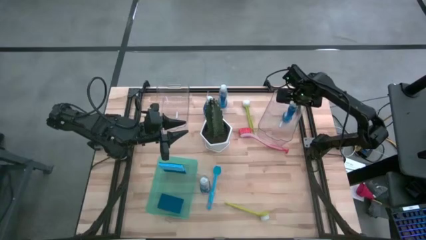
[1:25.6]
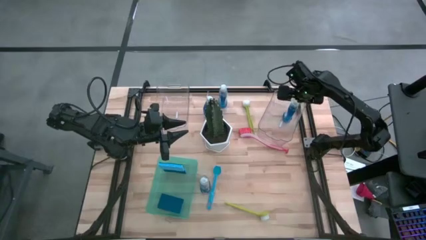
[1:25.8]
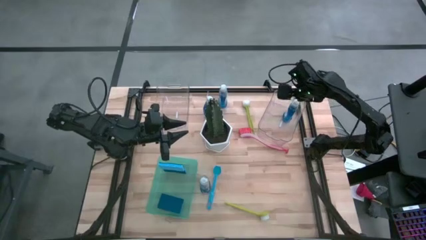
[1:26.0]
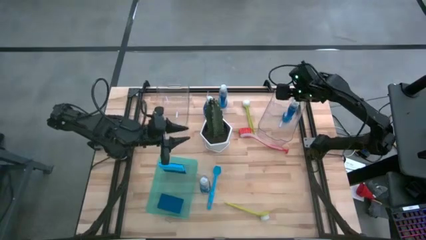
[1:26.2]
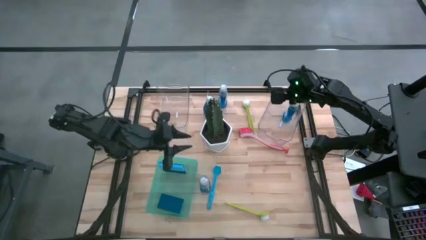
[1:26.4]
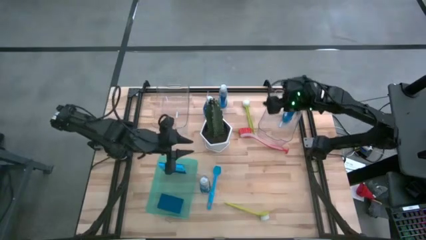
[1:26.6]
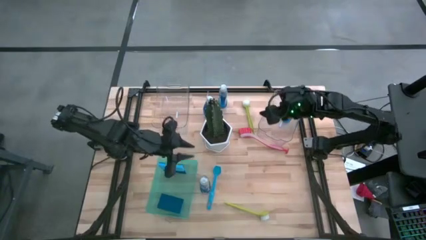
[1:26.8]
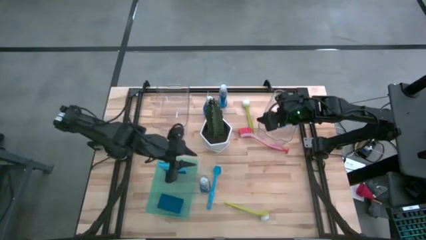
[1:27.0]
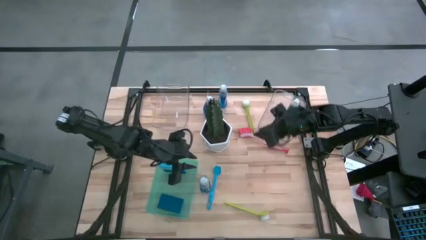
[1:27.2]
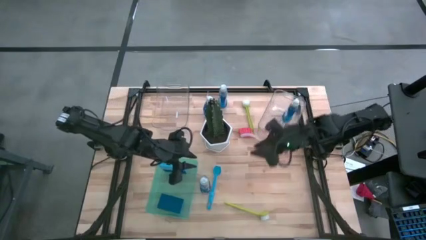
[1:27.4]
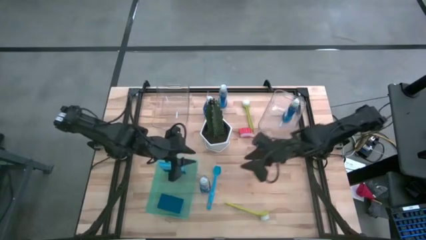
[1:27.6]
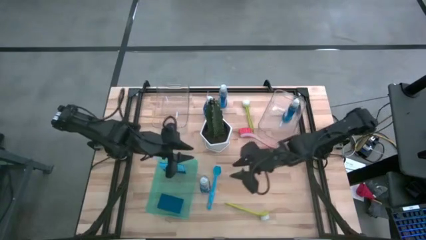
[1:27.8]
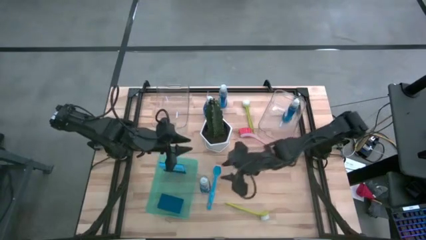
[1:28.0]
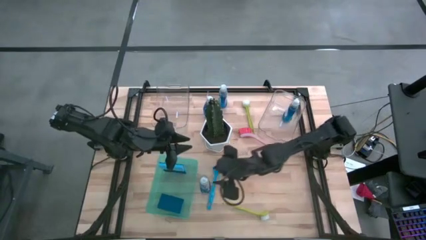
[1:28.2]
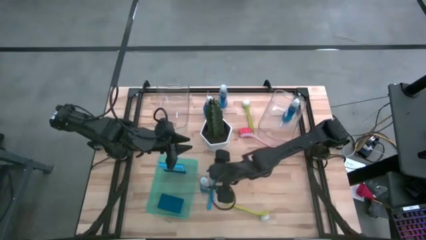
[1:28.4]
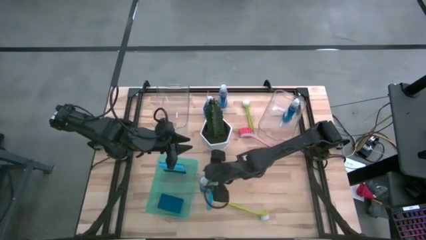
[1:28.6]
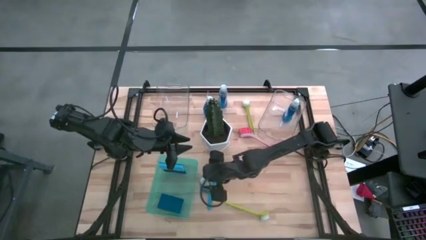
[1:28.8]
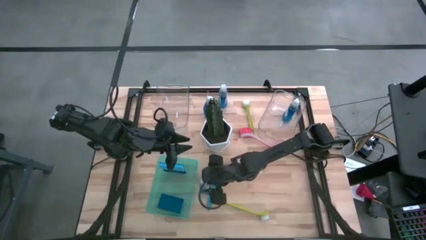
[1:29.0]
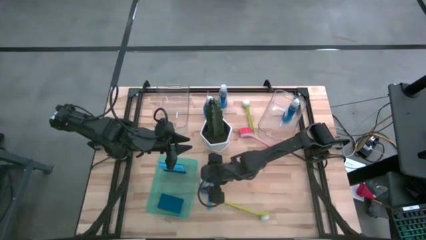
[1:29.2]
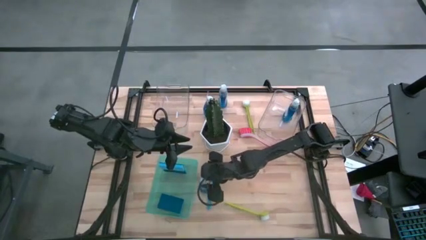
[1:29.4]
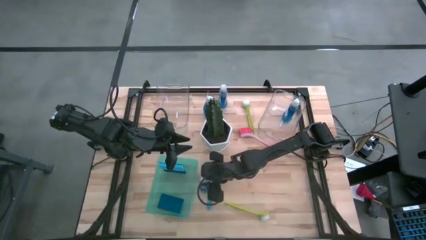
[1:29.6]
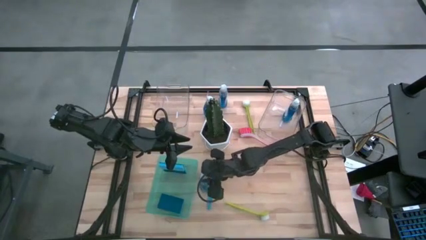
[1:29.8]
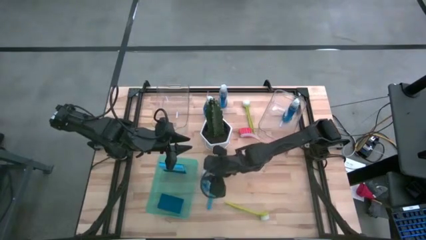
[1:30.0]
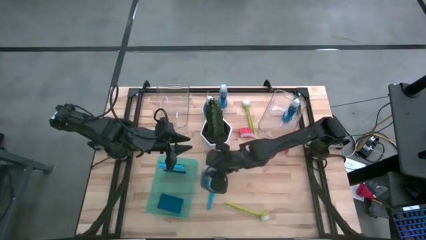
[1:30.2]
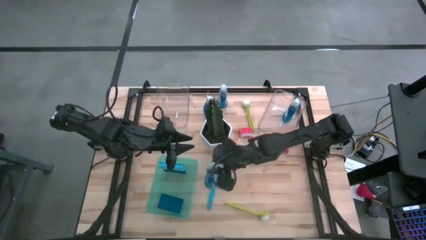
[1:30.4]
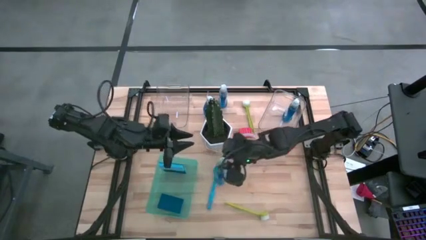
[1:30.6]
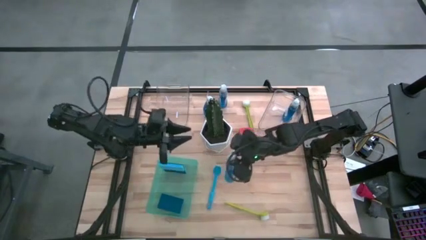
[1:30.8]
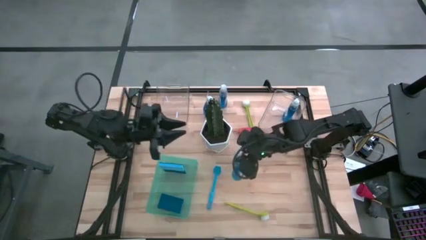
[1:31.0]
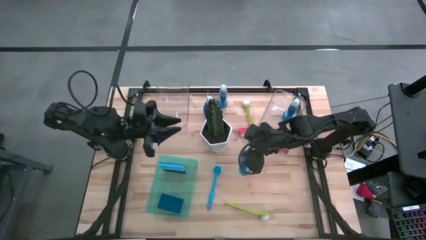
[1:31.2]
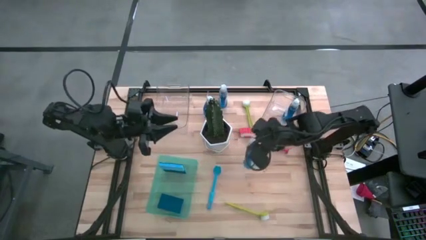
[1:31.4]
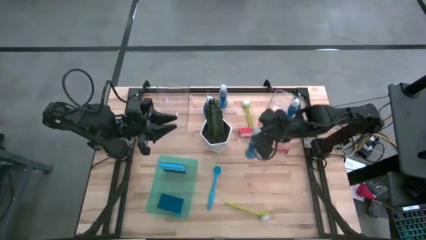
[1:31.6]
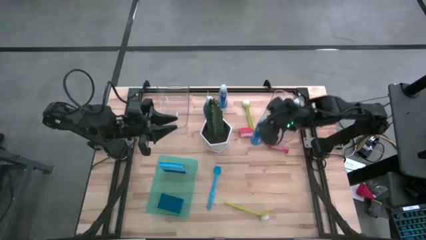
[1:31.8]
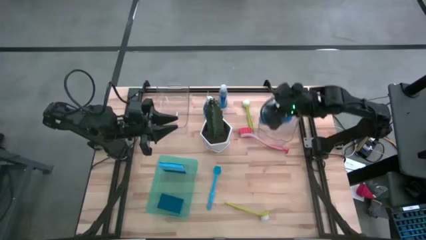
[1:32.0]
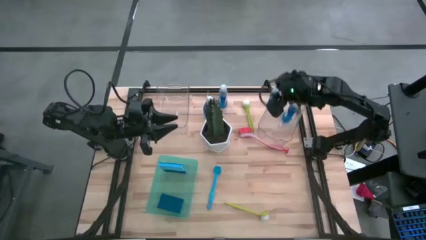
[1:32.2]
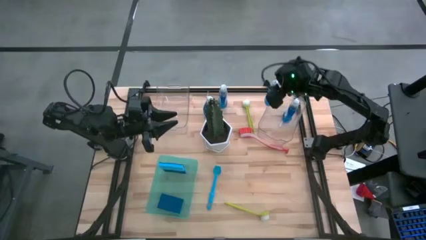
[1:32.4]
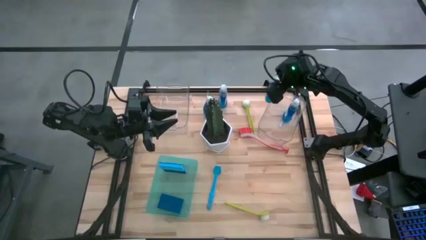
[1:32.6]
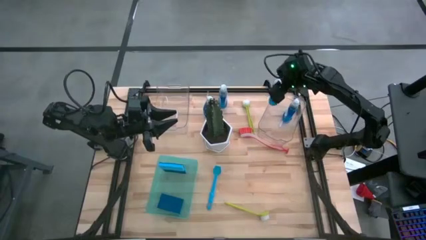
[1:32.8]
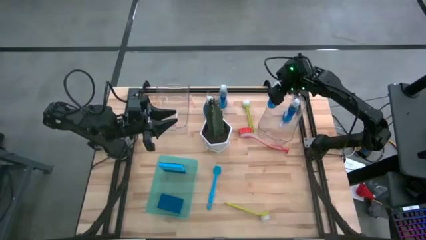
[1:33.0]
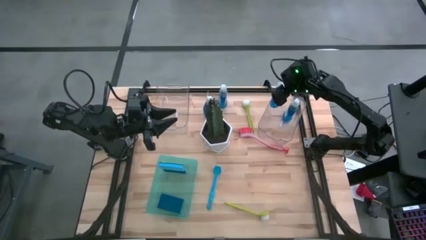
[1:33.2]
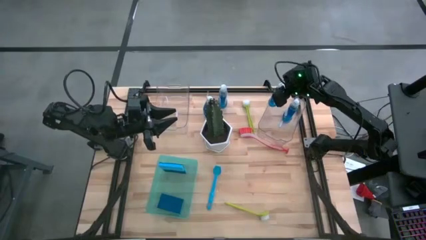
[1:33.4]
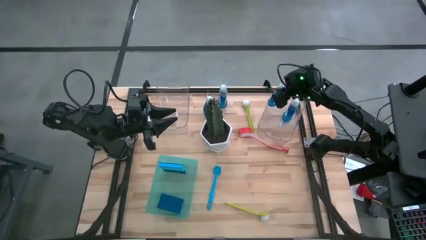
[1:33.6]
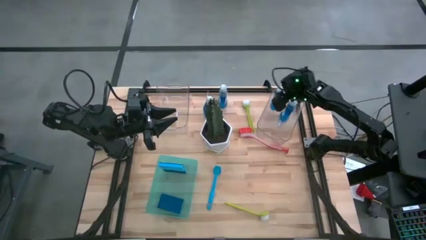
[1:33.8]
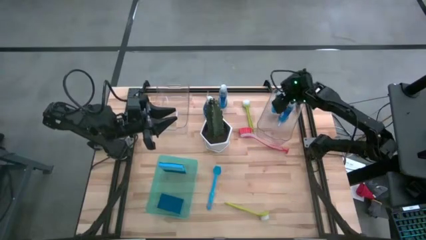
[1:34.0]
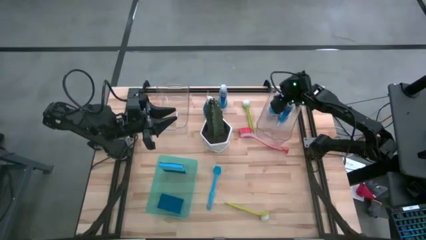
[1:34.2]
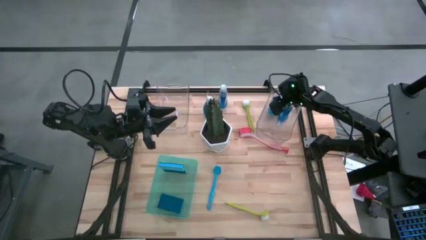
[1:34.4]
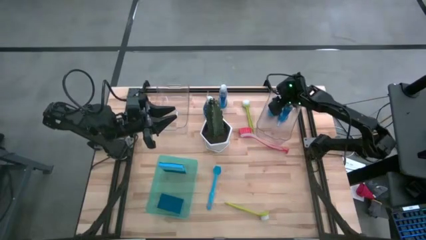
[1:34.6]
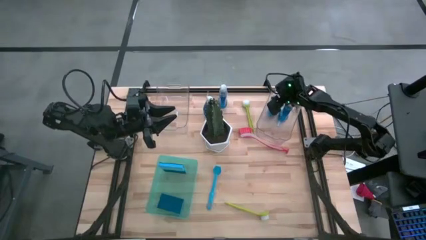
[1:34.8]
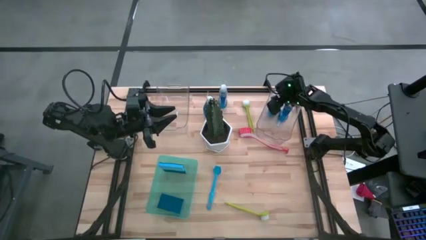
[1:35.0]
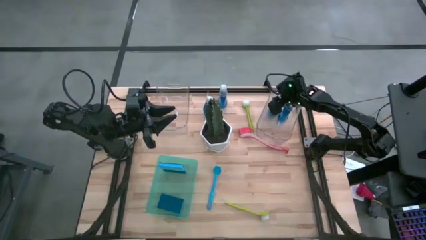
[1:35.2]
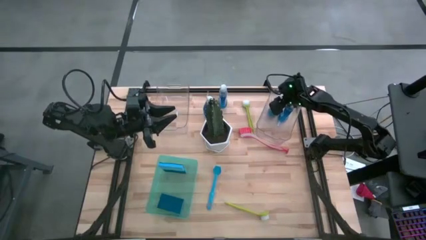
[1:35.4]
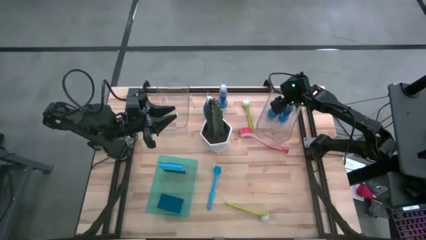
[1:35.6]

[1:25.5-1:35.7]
Task: Pick & Place Kitchen Sink Supplies
Put the blue dishwashing liquid bottle into the right transparent bin

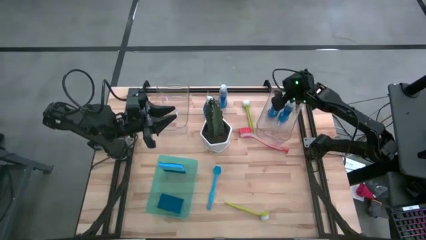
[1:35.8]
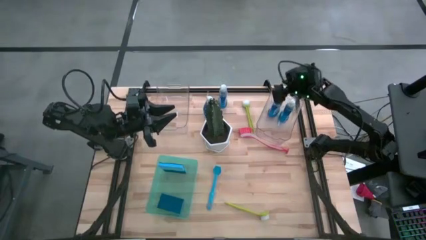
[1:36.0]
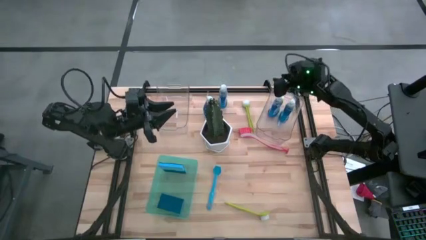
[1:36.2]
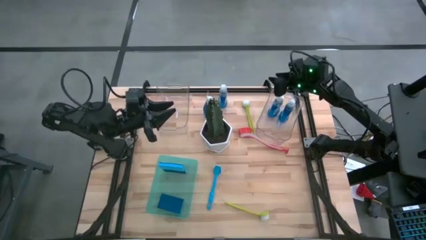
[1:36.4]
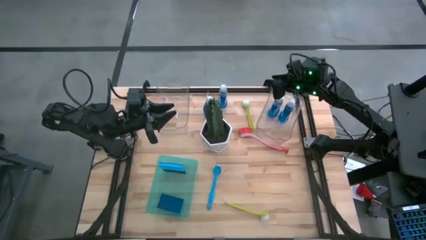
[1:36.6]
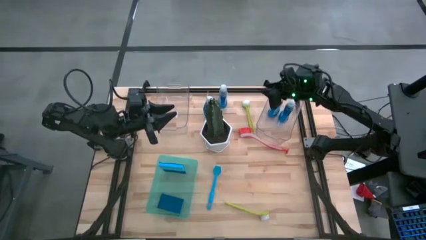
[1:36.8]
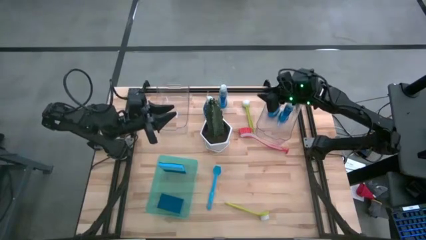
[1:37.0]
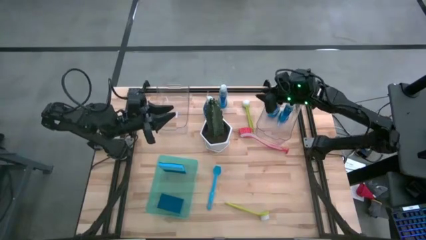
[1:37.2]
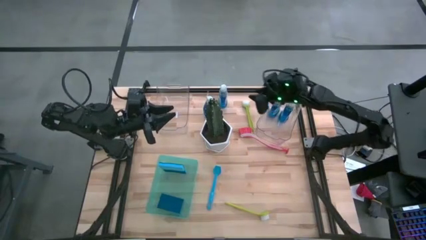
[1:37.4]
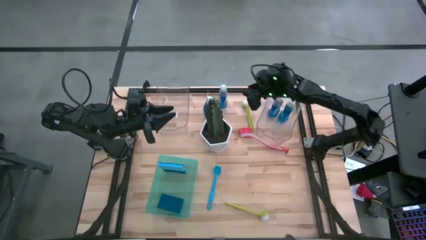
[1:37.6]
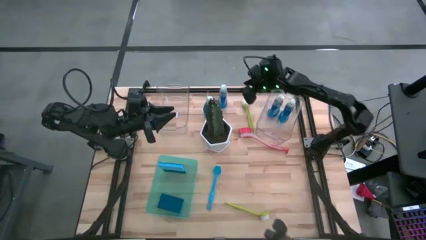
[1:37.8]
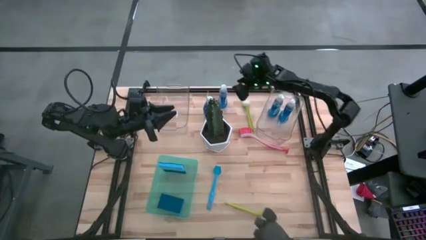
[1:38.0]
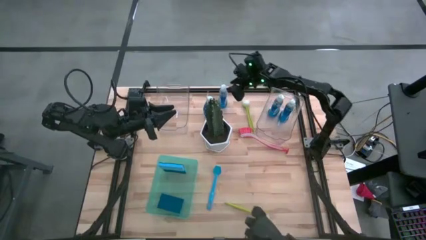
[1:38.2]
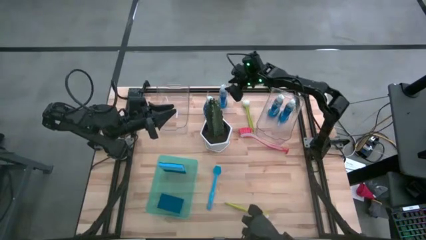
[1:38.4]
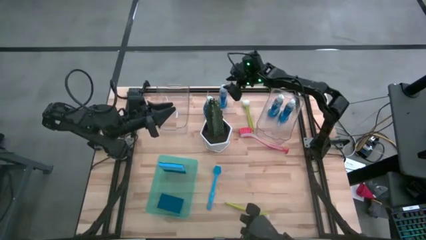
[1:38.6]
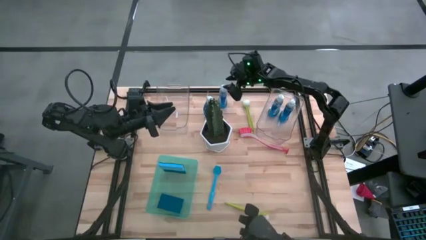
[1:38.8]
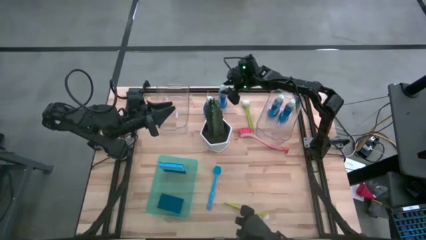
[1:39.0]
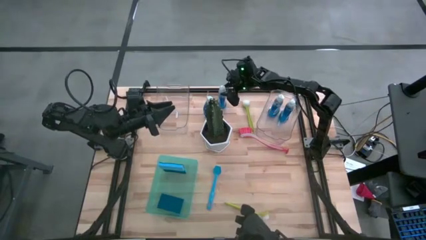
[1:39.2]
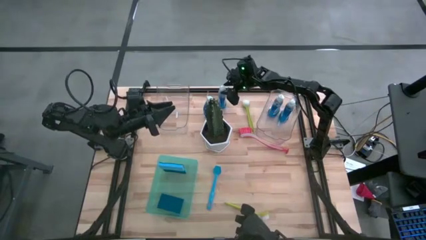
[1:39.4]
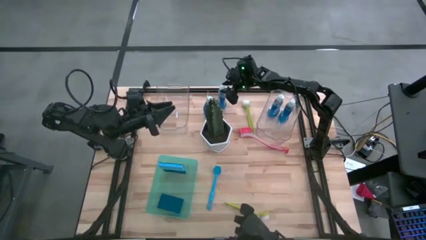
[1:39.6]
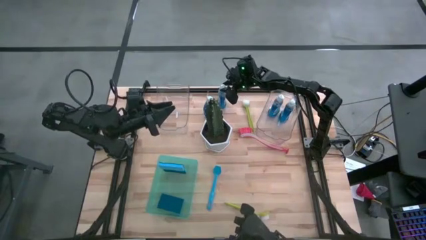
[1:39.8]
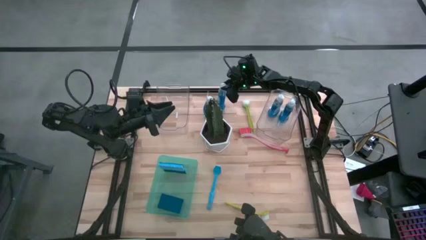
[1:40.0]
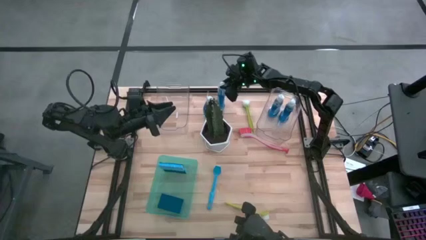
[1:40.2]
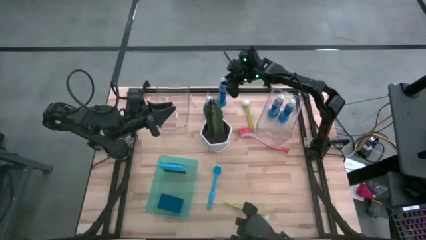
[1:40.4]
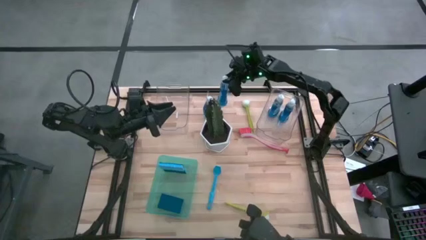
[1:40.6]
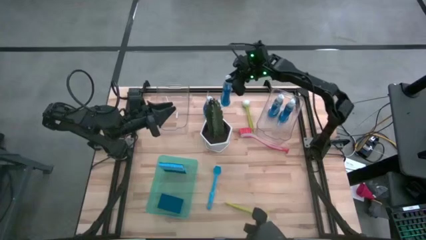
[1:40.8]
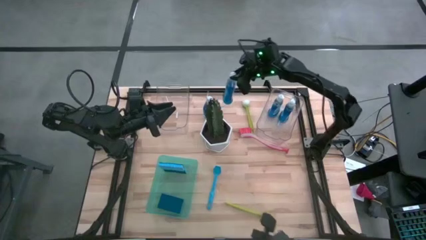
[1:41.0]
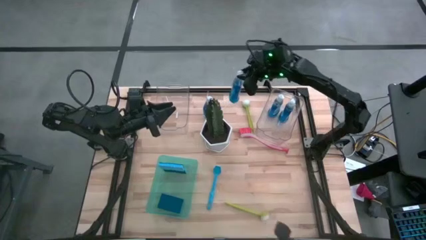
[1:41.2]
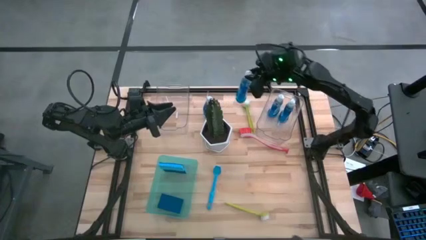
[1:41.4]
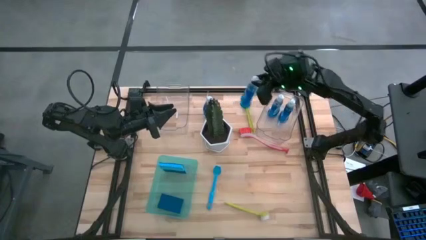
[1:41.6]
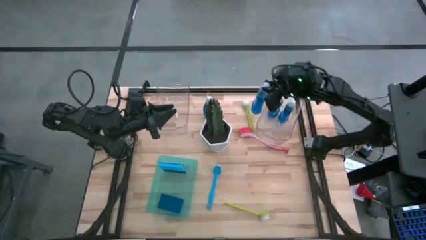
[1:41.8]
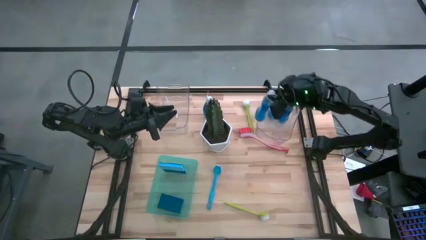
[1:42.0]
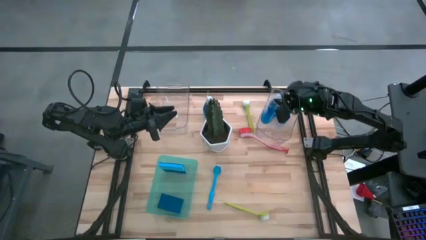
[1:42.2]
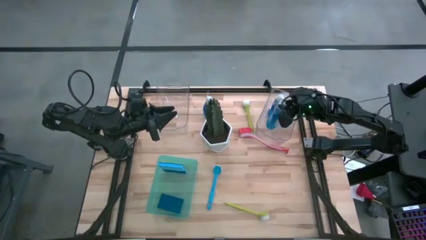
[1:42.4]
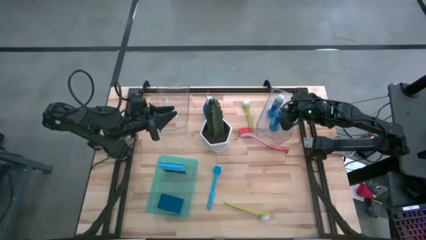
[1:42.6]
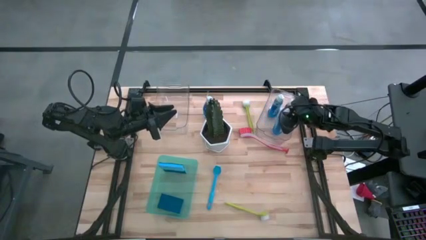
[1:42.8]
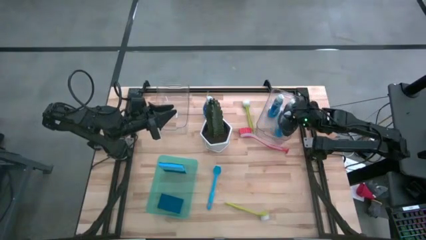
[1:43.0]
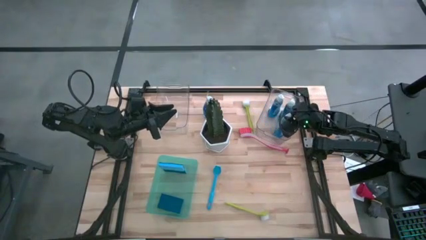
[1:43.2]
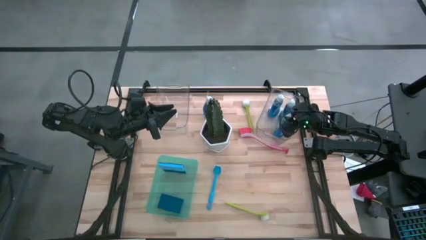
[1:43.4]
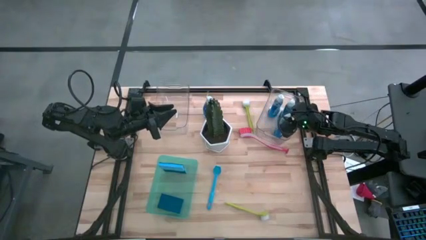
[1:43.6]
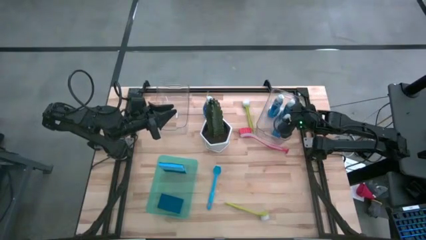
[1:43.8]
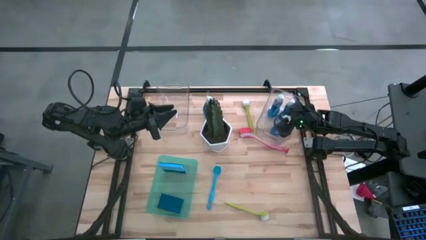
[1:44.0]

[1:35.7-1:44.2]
Put the blue dishwashing liquid bottle into the right transparent bin
